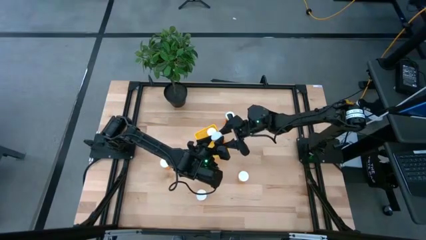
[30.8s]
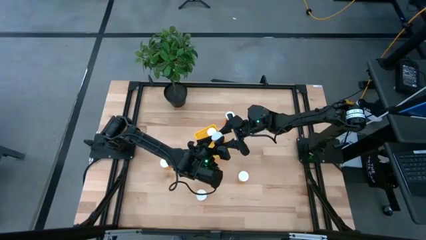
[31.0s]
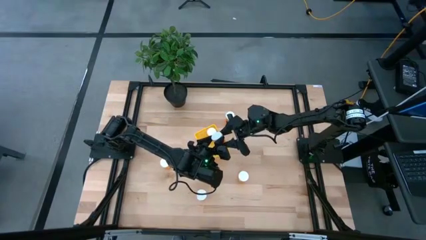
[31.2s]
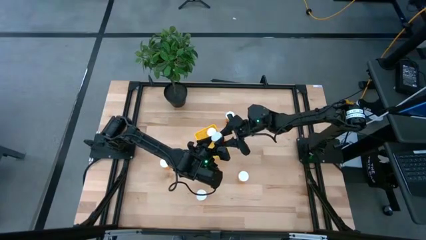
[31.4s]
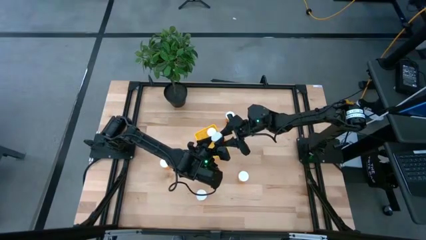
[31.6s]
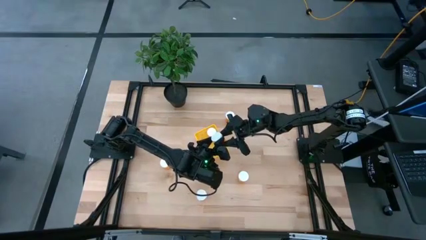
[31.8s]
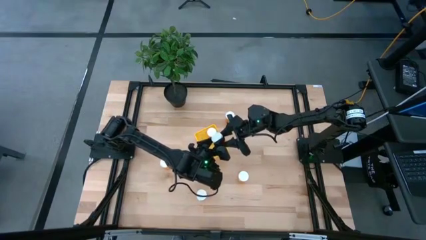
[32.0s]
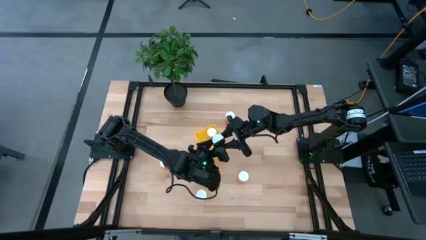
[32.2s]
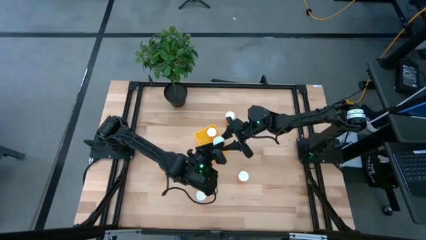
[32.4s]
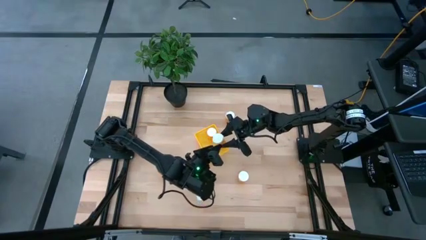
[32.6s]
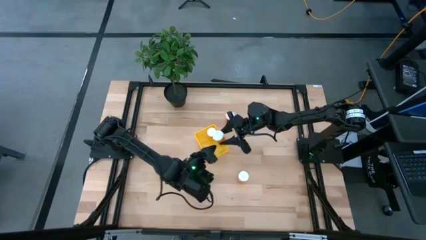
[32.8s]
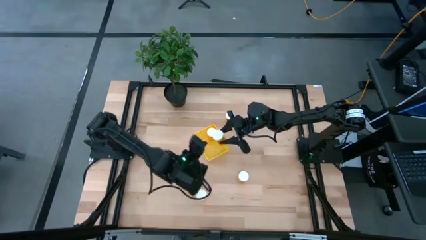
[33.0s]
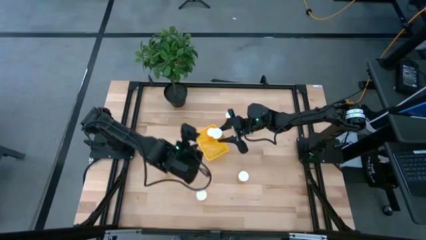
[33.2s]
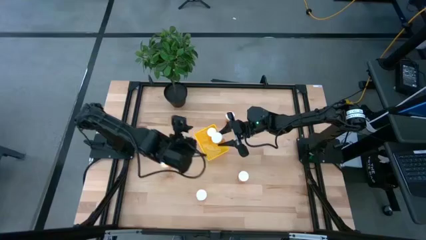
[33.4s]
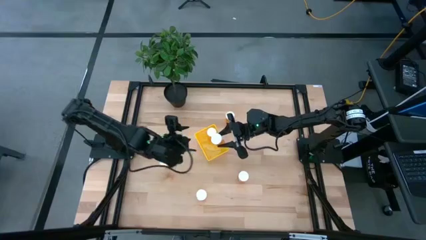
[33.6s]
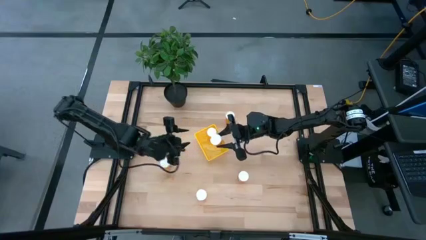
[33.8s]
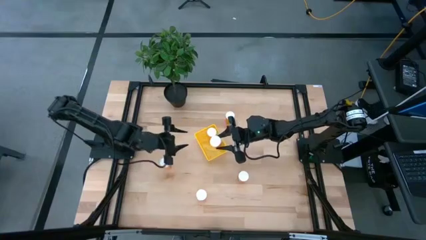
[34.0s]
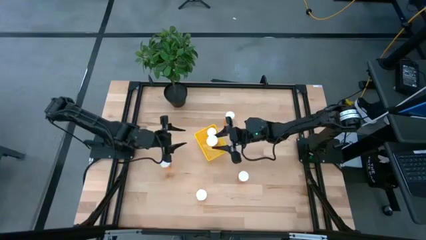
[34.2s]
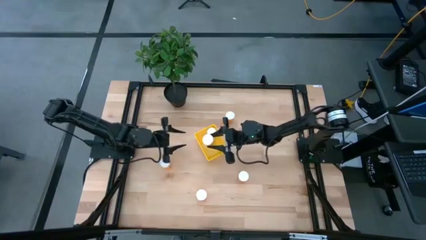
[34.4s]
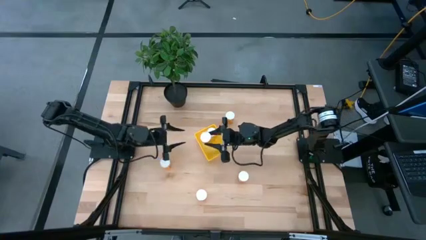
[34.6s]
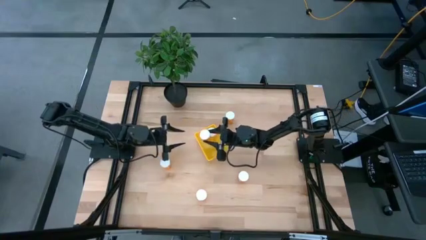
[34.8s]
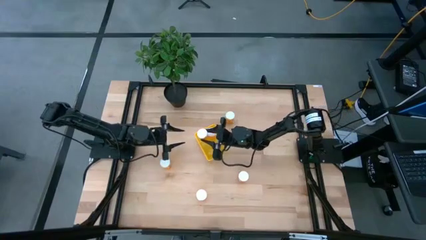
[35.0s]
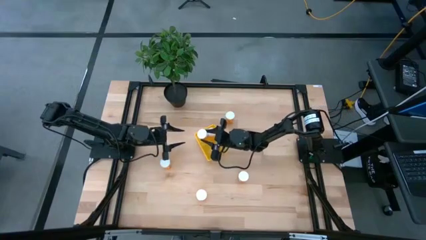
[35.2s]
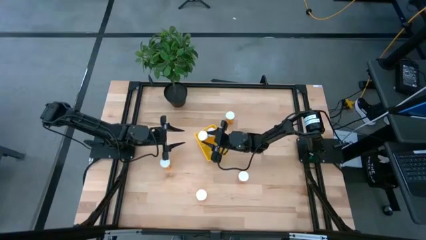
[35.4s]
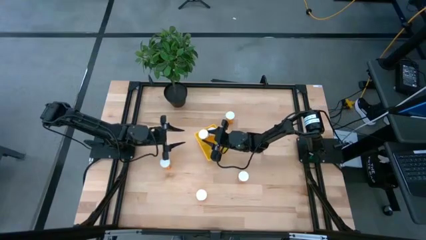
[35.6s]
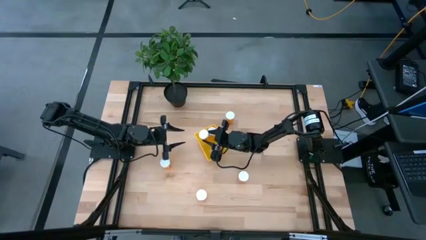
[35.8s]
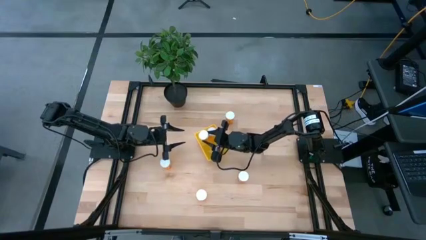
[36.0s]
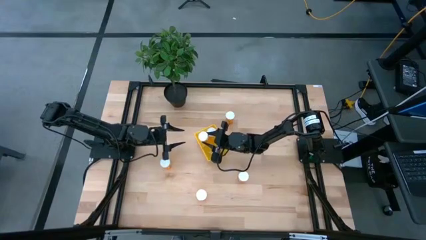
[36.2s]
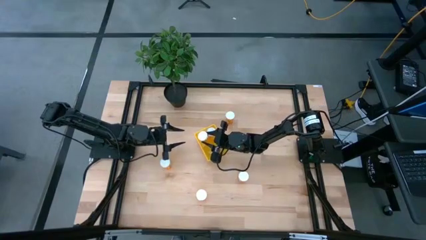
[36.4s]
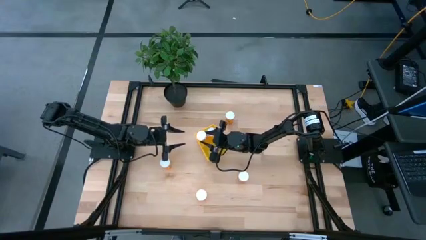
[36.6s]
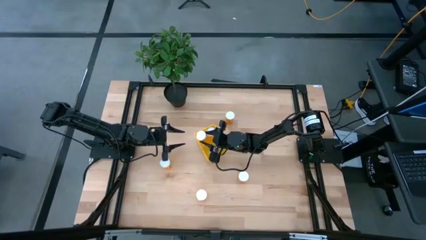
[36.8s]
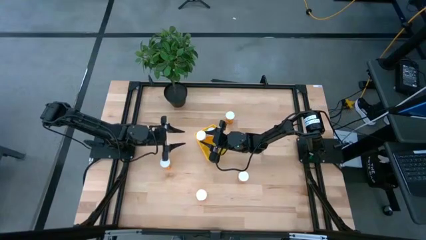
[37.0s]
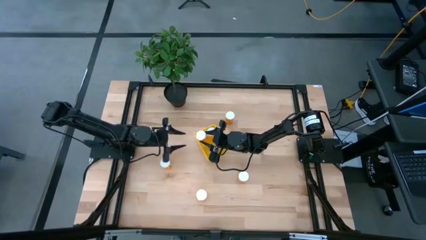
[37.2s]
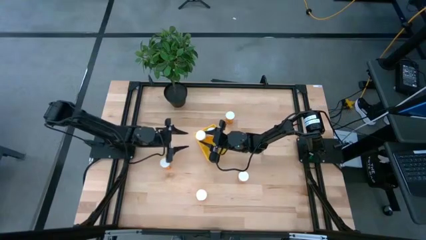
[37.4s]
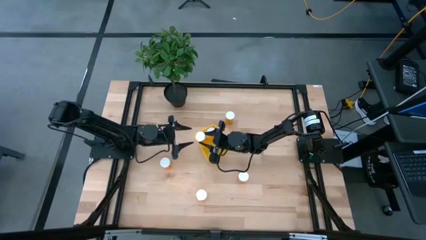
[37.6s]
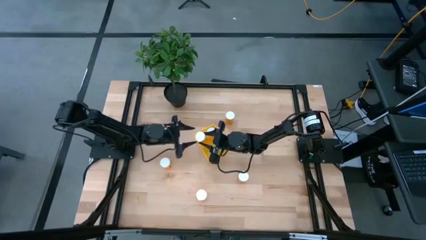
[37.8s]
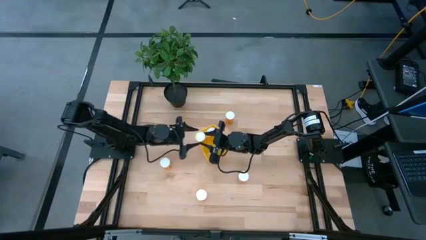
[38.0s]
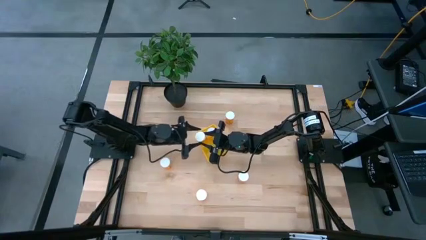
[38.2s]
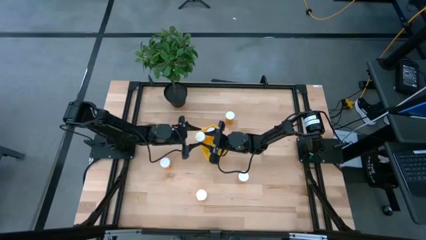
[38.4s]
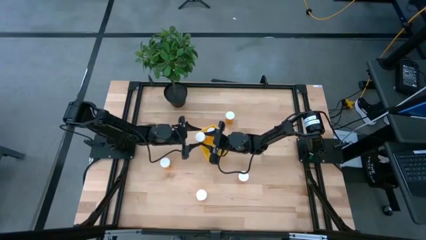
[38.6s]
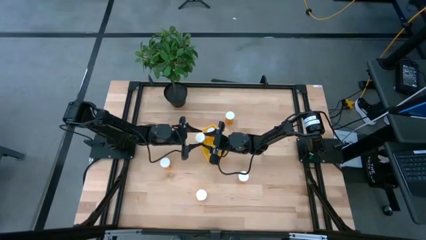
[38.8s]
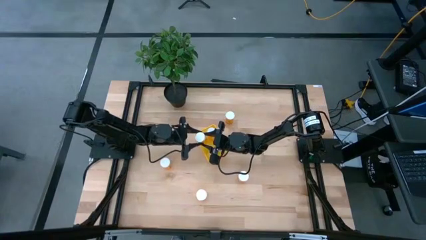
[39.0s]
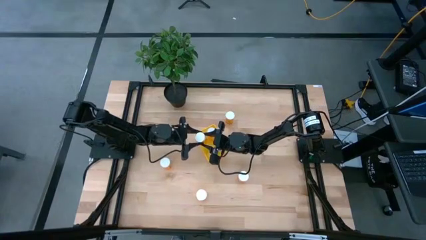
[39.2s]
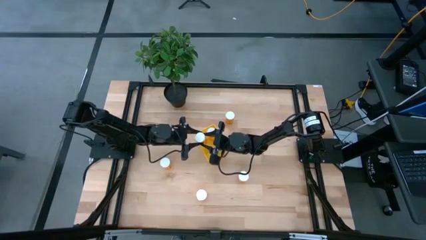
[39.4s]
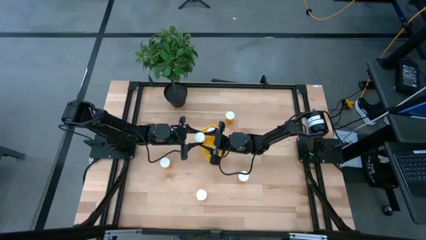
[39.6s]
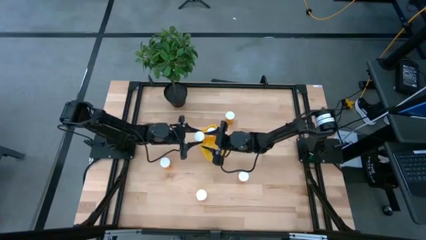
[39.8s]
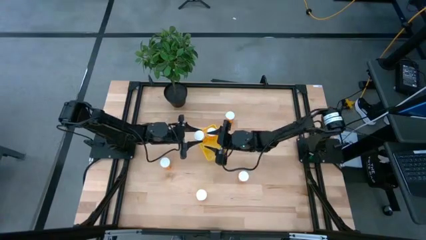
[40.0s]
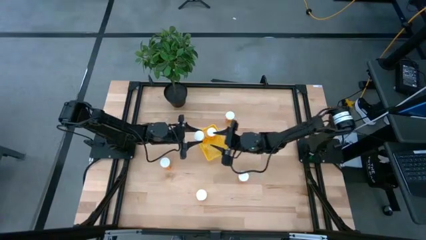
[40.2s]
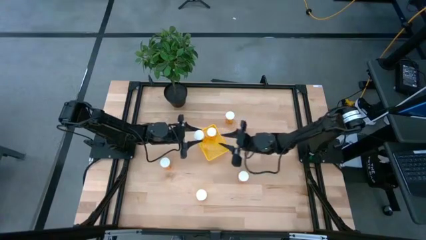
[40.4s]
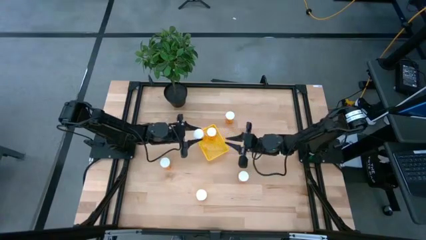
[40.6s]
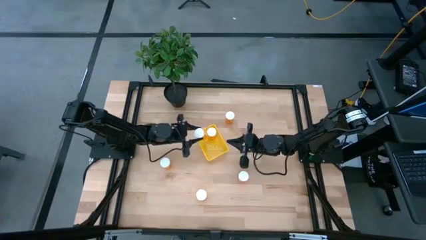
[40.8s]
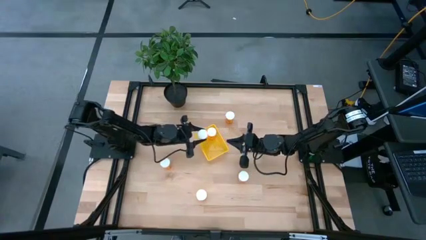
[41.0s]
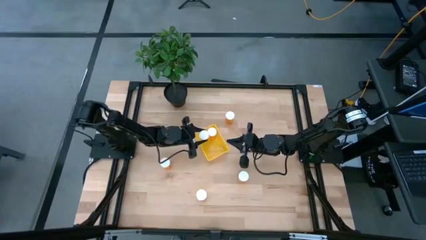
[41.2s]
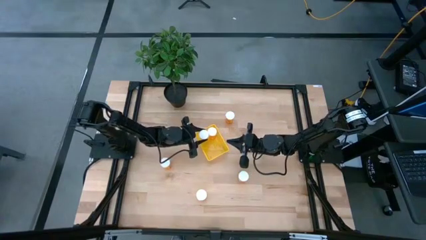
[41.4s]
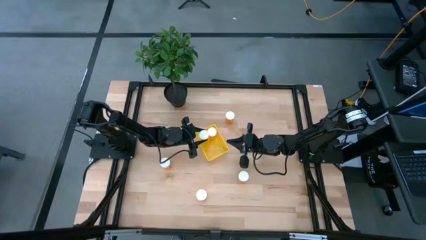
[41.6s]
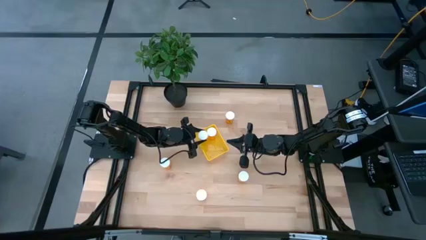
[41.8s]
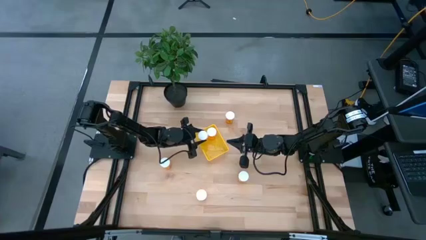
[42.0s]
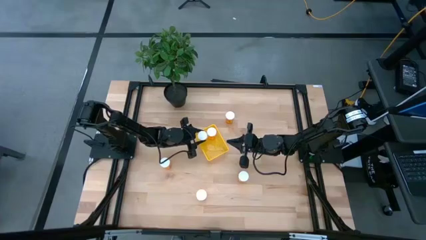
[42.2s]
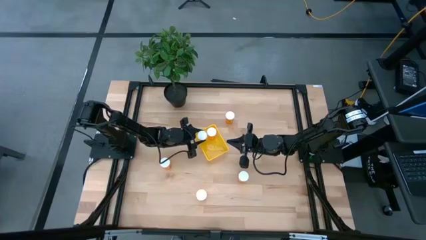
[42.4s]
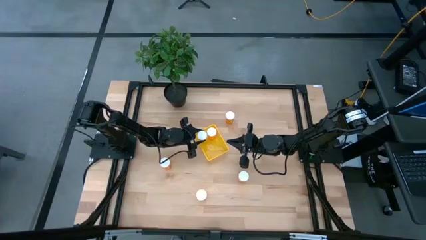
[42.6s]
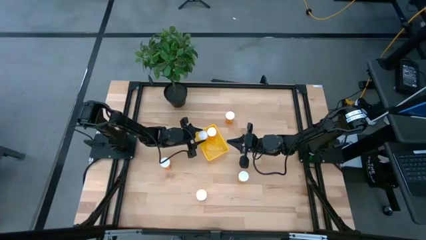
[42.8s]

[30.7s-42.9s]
Task: Pick and place pill bottles into a basket
Put the pill bottle into the bin
